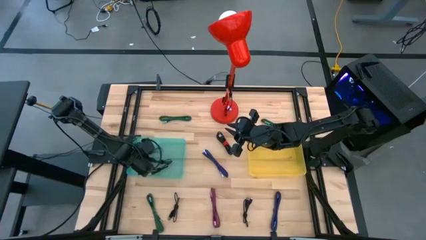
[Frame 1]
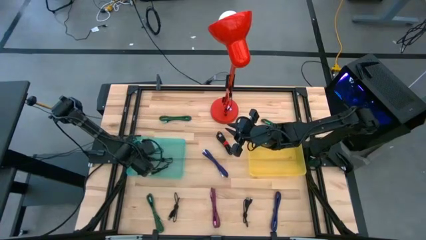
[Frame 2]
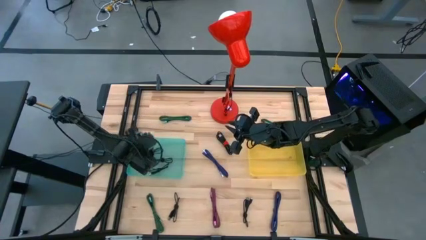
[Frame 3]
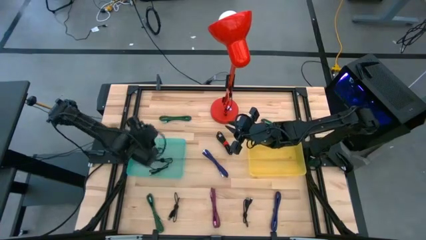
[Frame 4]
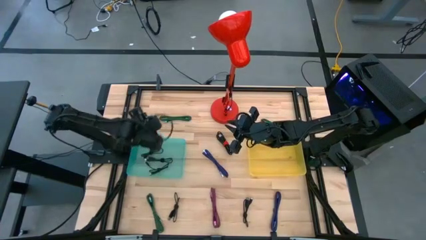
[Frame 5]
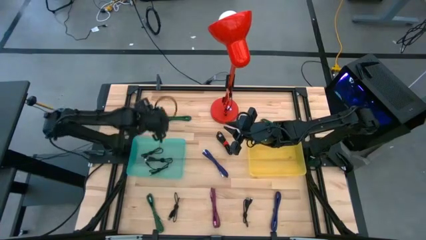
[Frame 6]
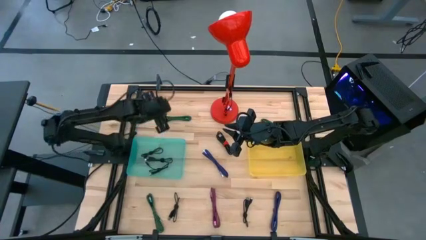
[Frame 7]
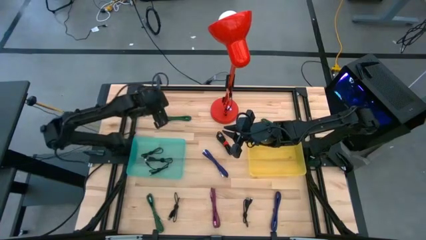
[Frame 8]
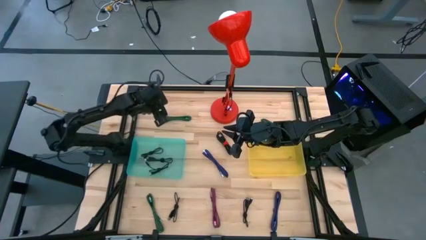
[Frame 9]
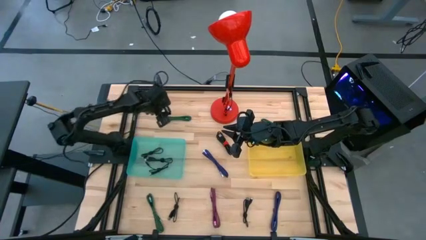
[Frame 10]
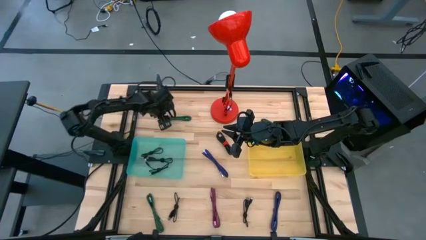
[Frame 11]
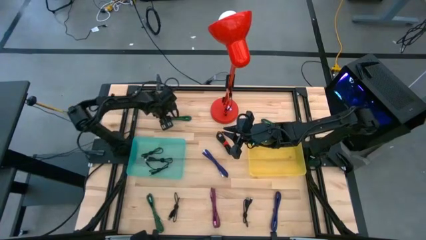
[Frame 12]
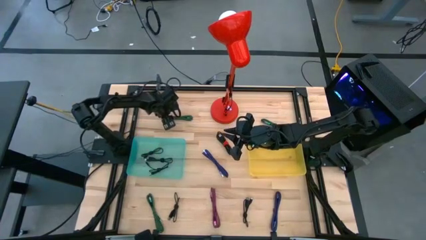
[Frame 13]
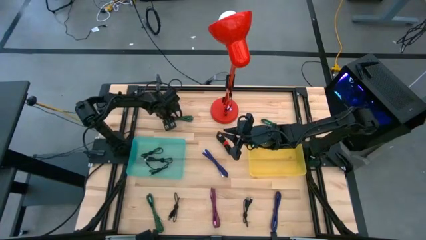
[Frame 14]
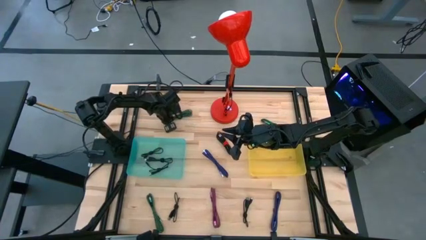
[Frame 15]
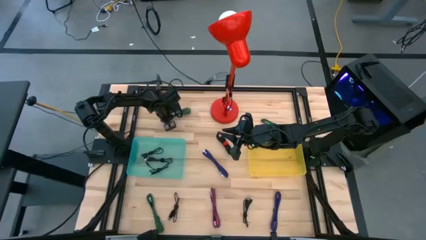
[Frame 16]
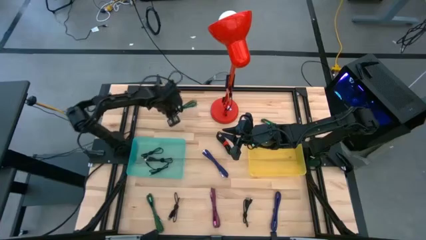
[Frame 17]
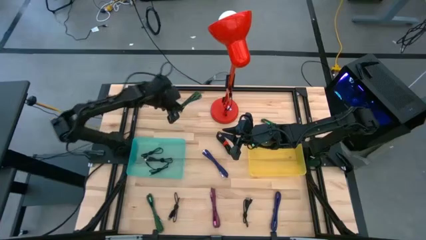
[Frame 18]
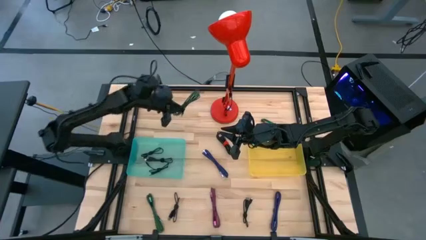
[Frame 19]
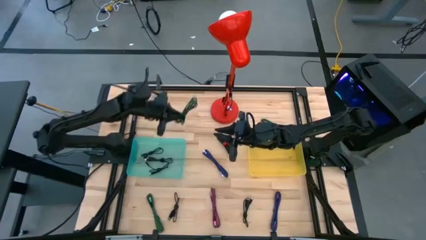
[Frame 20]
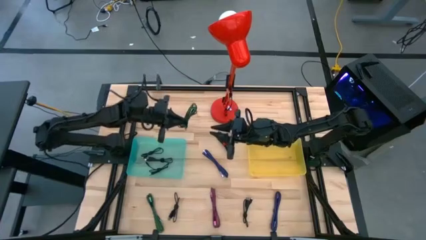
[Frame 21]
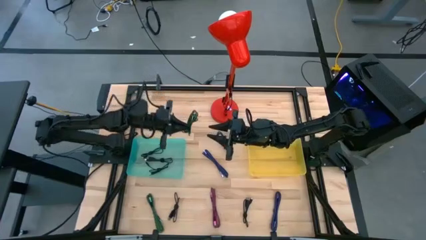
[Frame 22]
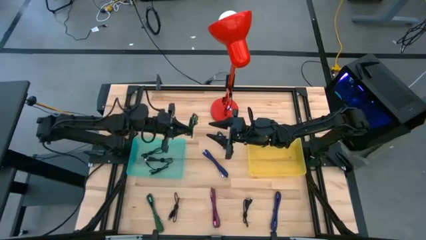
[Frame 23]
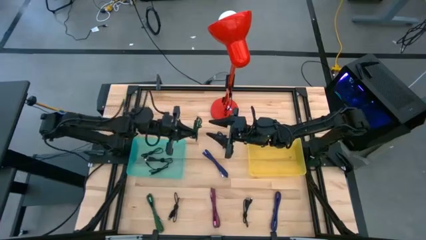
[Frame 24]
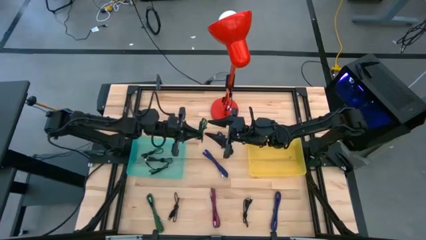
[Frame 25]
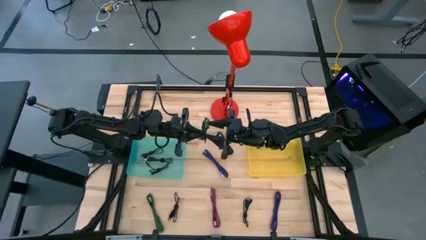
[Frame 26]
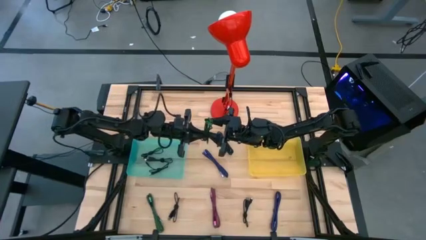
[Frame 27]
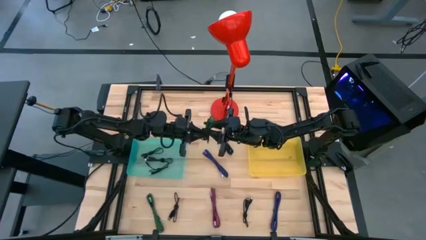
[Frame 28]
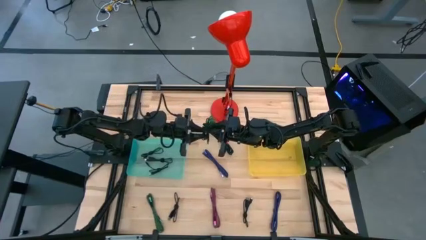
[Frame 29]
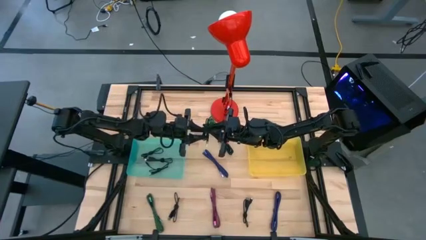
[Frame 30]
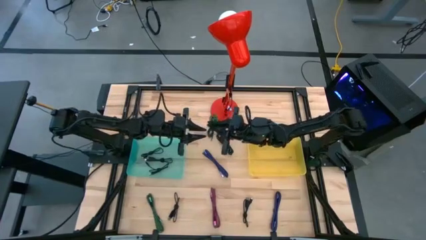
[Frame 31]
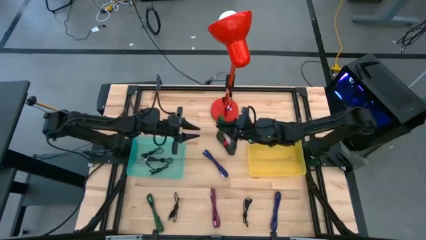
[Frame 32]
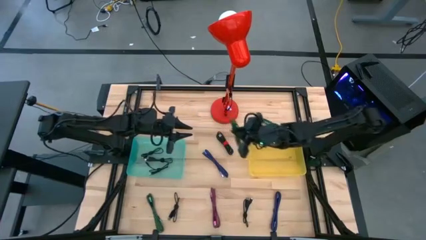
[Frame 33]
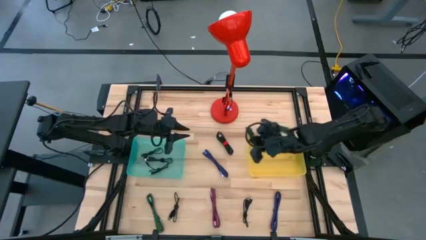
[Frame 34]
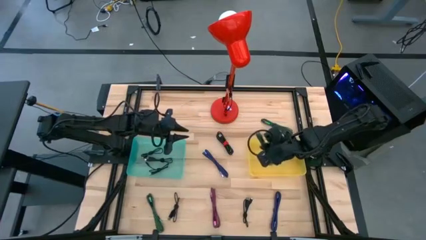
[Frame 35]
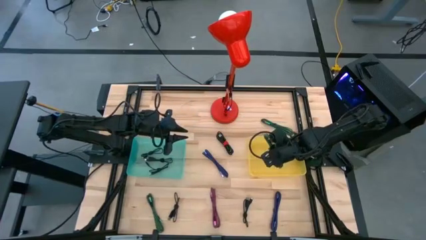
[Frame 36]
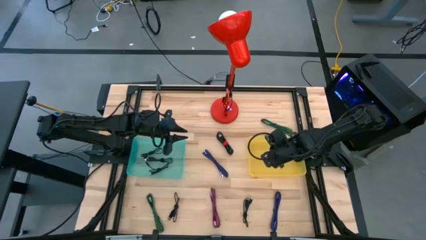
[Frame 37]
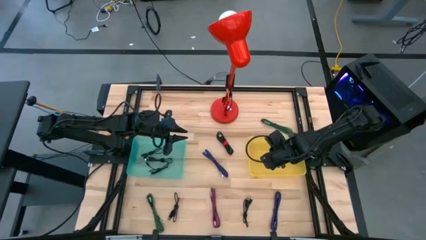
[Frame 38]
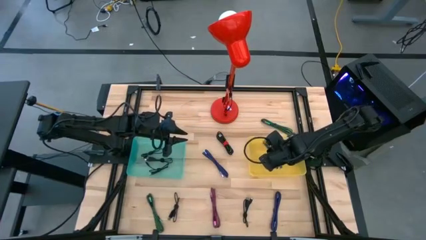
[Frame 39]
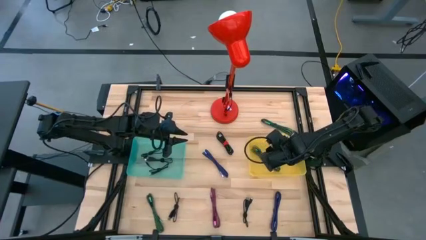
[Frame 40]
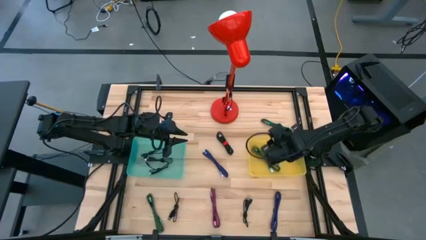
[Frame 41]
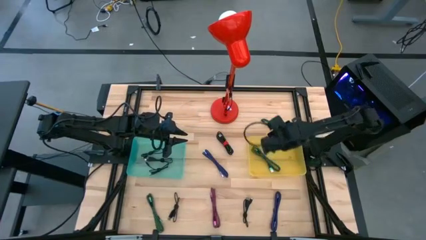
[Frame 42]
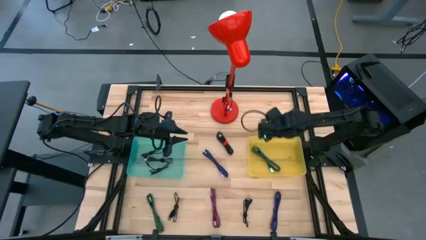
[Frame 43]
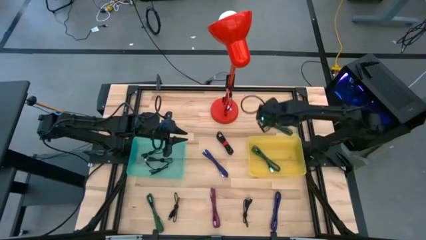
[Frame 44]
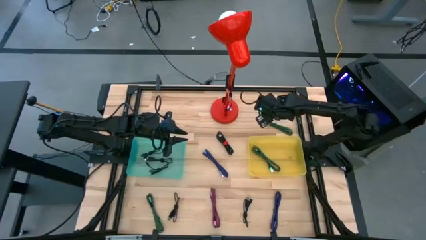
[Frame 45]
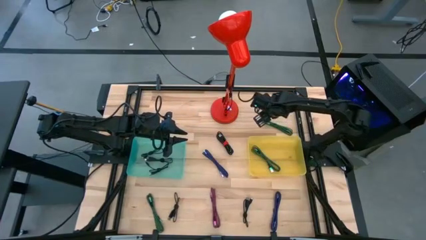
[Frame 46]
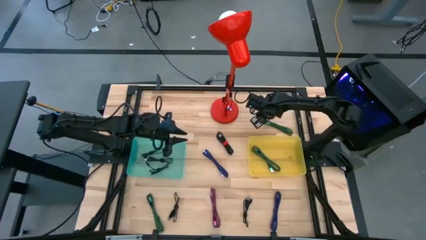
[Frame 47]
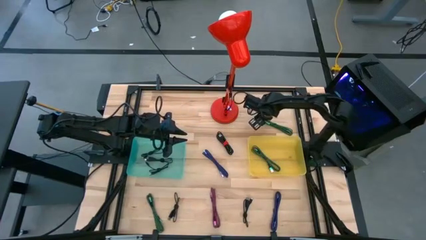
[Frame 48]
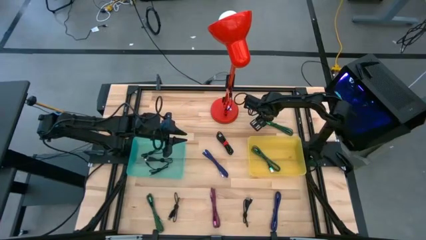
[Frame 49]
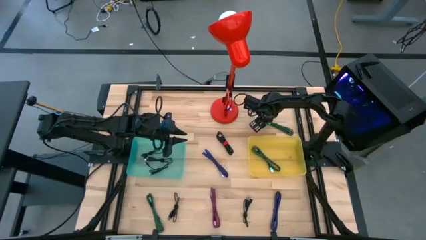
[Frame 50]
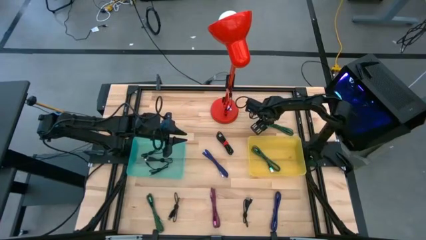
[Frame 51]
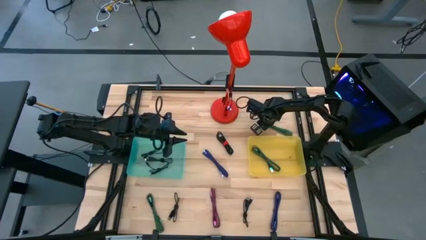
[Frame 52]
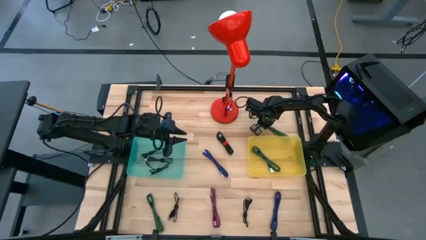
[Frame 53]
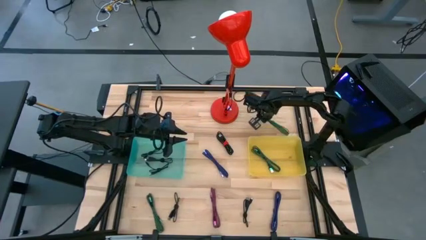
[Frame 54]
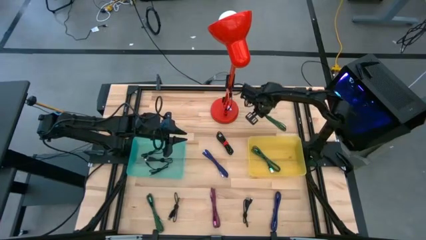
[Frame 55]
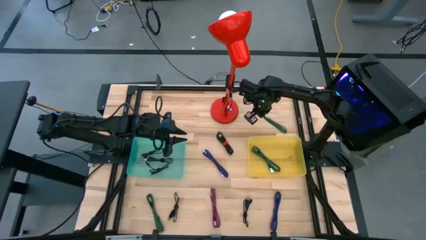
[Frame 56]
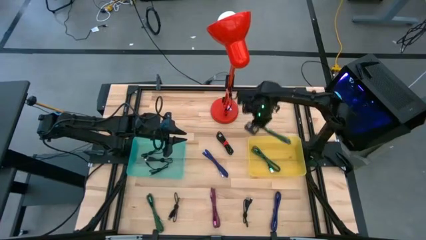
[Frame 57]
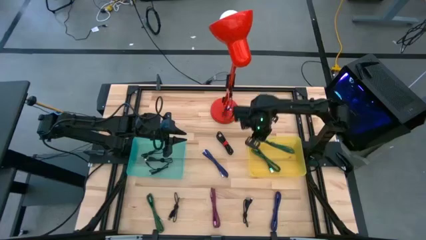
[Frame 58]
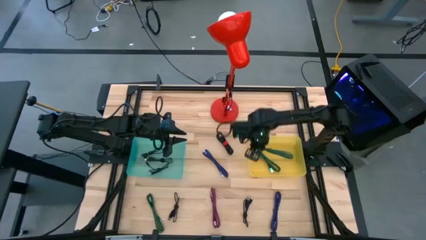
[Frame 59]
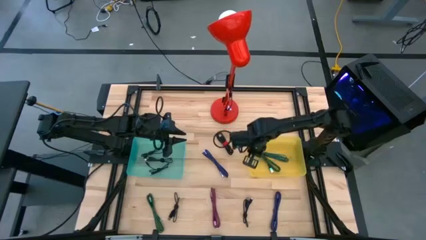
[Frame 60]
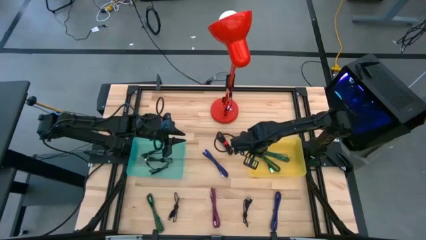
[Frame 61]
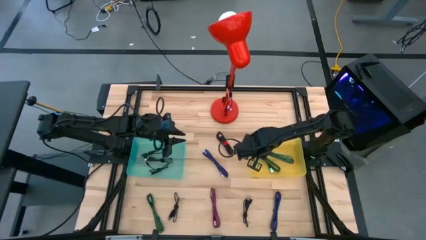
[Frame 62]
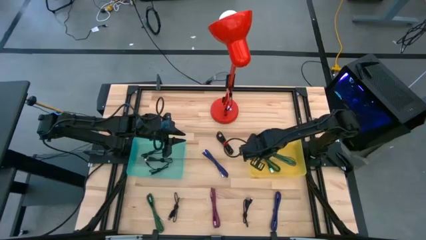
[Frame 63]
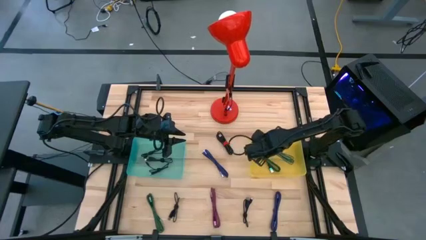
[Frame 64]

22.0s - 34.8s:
Task: Pick & Place USB Port
Put the green cable into the yellow bin

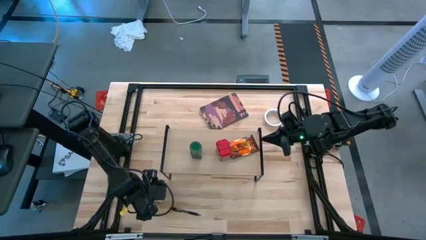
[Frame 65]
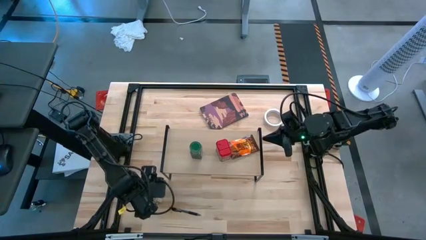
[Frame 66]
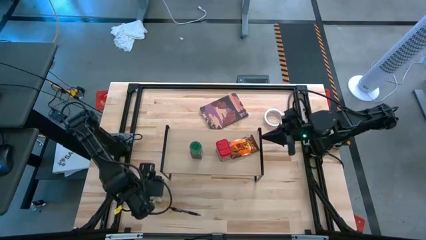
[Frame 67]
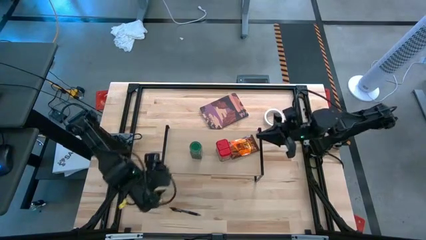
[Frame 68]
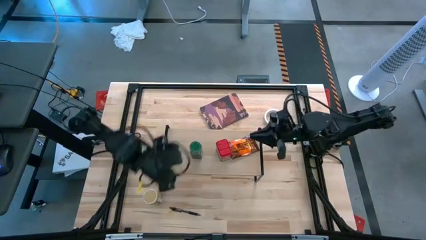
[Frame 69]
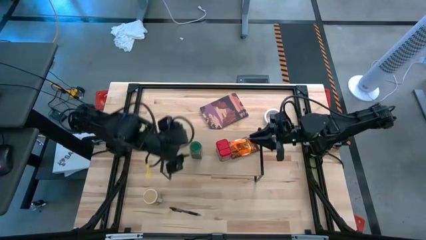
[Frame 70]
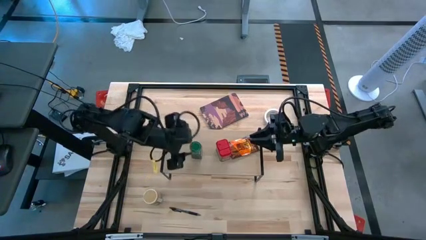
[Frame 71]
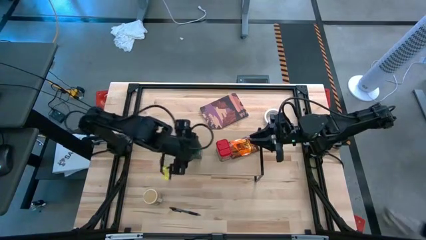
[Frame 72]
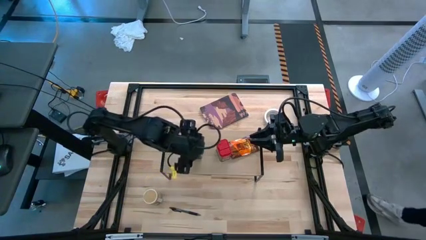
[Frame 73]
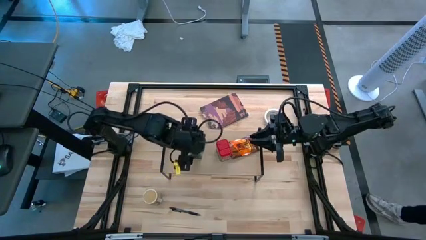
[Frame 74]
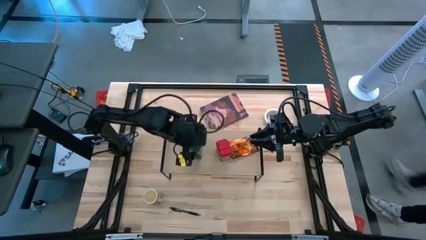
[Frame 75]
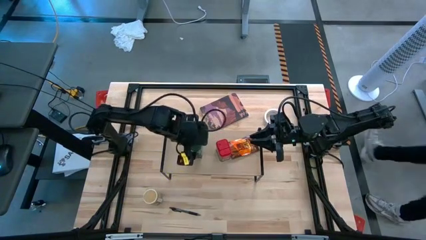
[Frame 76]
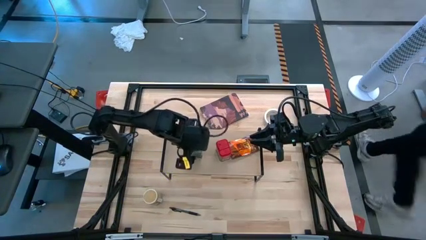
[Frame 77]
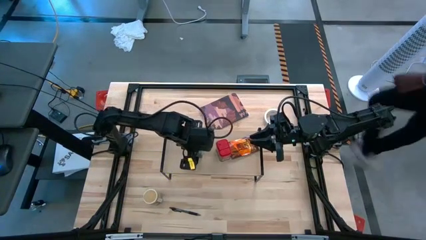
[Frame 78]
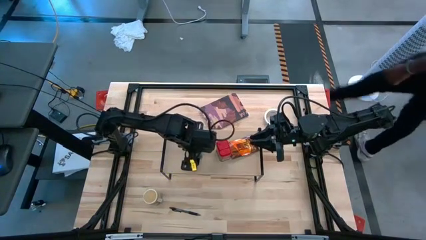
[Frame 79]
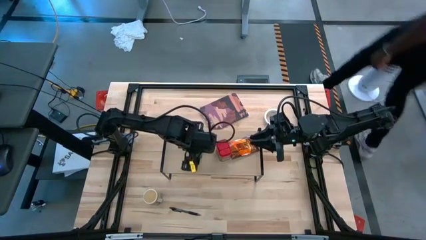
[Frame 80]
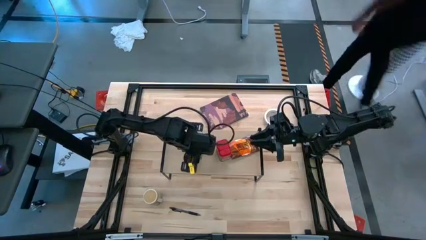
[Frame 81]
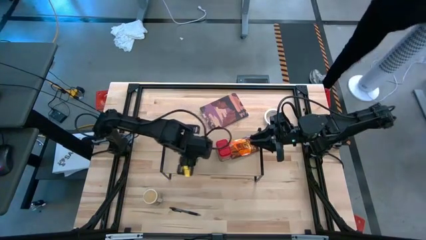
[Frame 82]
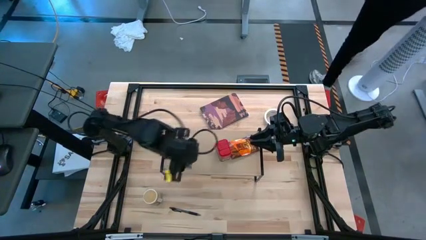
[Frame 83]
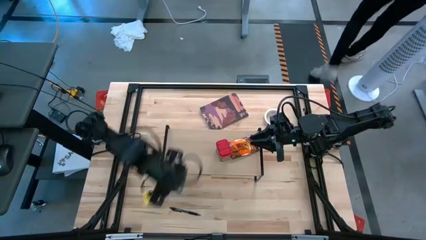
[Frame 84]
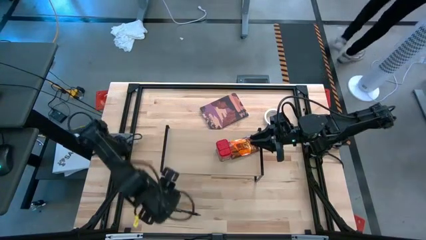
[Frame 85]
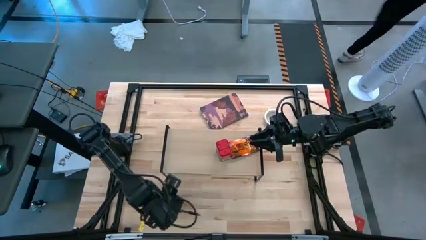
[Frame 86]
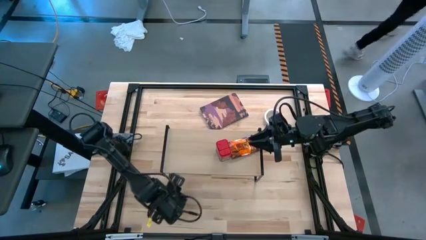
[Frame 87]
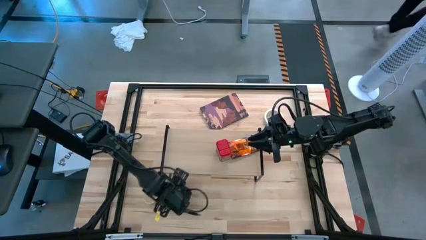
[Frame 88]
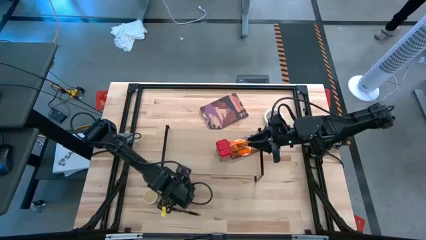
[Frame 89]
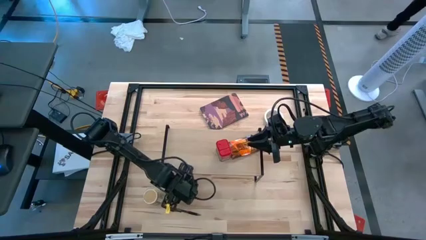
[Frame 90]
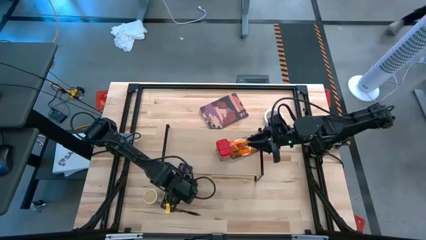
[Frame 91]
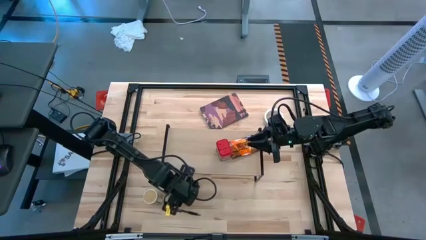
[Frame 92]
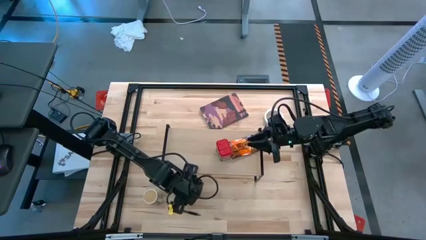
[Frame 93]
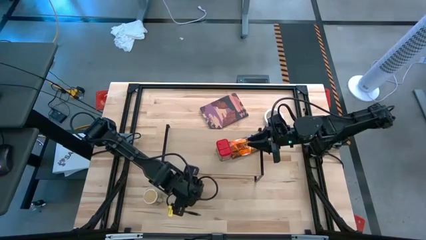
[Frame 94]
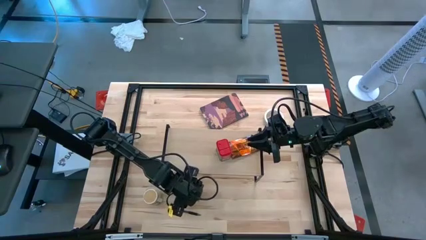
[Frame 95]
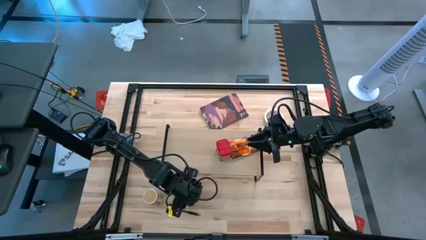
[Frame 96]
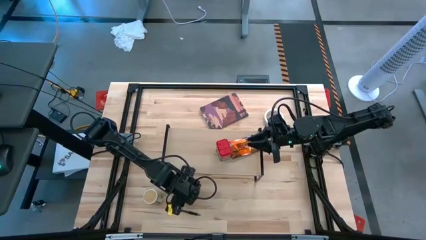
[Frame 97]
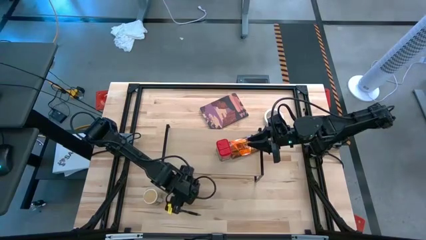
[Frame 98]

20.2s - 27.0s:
Task: Shelf spices
Remove the green seasoning bottle from the shelf
